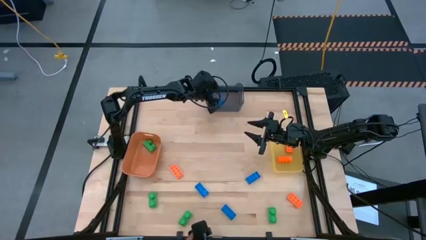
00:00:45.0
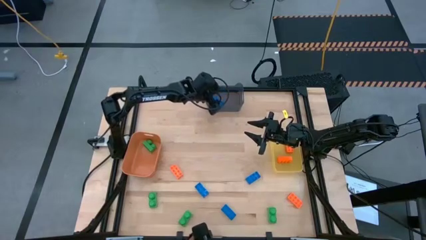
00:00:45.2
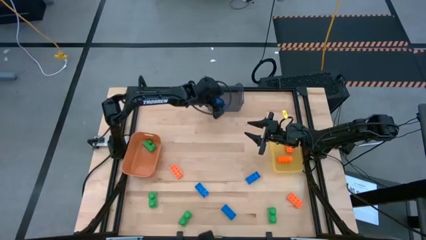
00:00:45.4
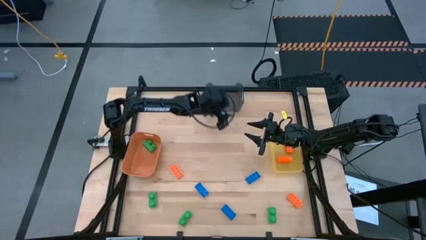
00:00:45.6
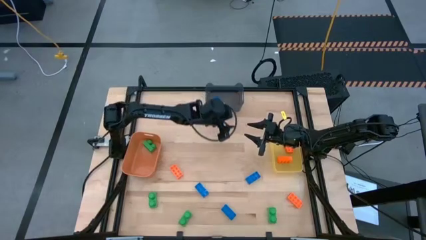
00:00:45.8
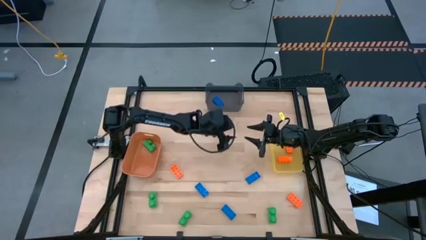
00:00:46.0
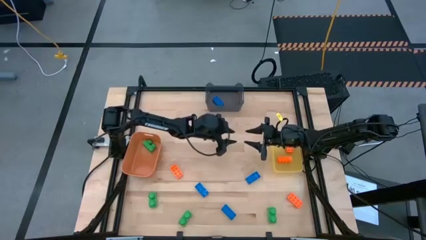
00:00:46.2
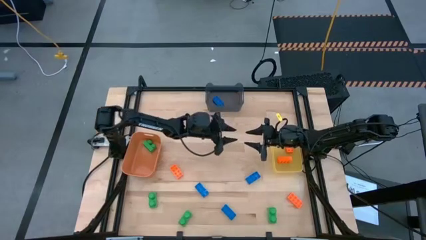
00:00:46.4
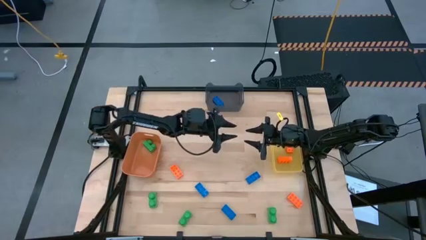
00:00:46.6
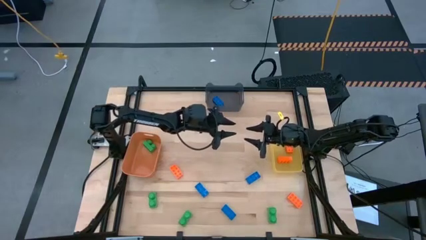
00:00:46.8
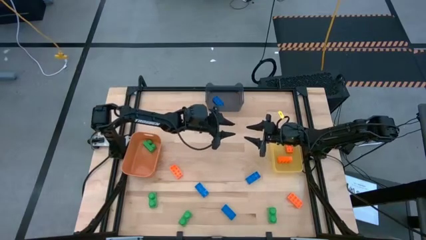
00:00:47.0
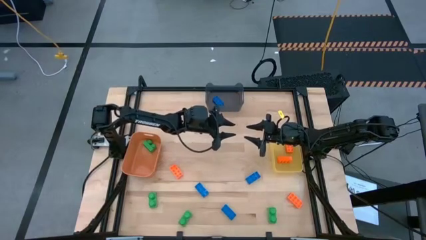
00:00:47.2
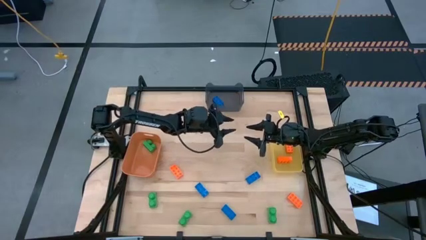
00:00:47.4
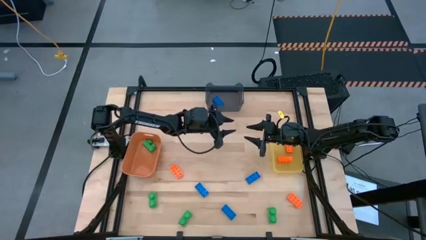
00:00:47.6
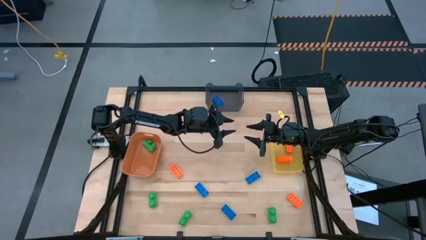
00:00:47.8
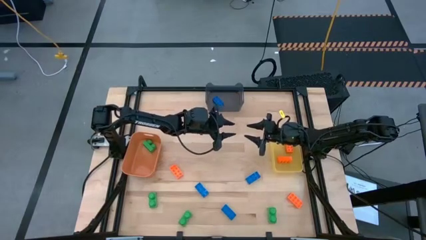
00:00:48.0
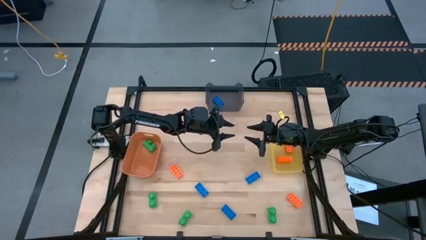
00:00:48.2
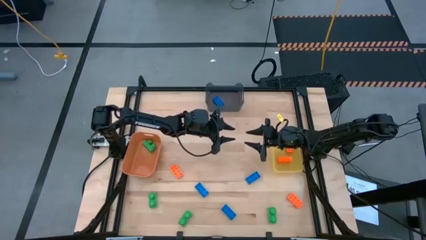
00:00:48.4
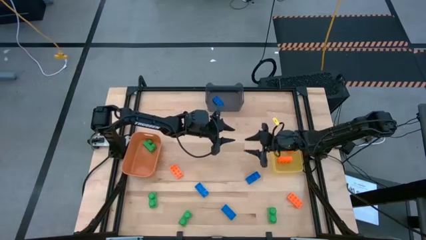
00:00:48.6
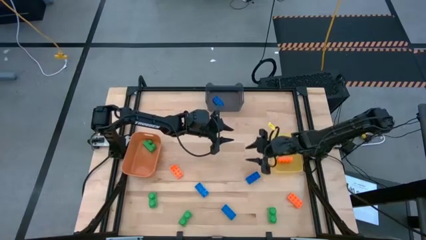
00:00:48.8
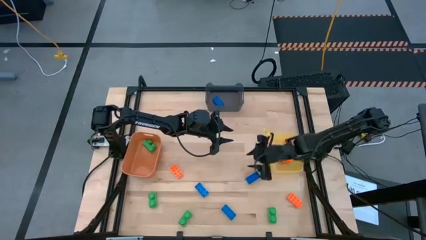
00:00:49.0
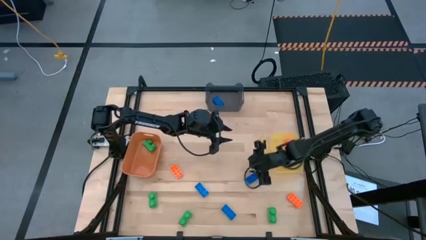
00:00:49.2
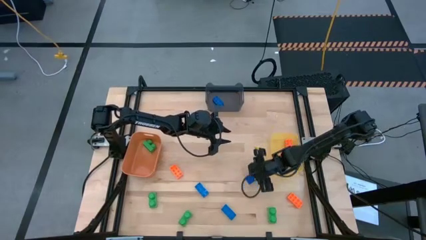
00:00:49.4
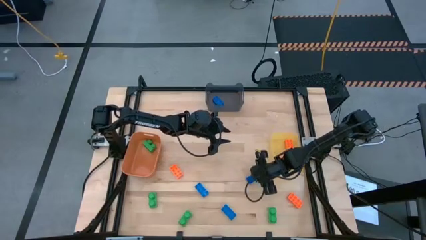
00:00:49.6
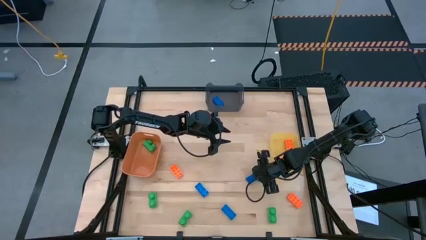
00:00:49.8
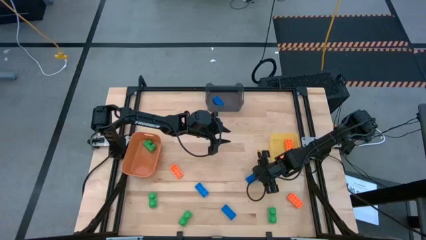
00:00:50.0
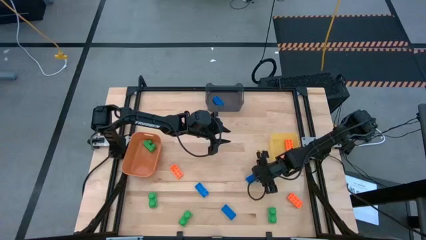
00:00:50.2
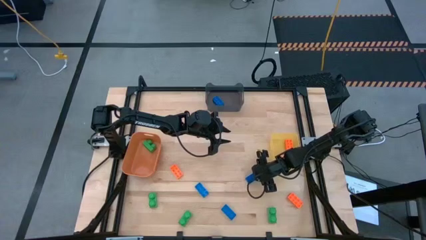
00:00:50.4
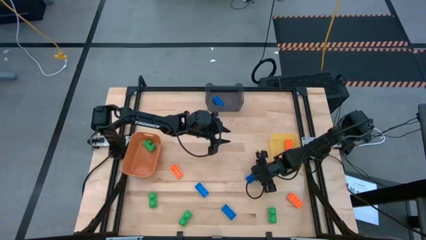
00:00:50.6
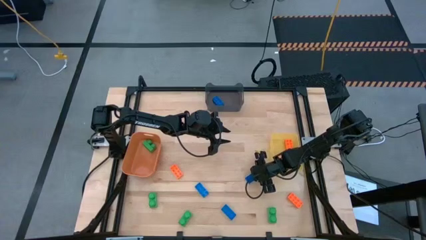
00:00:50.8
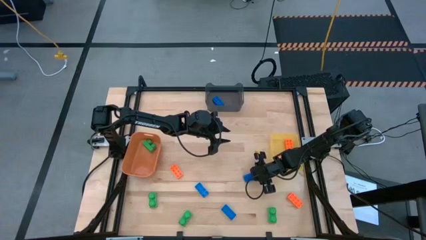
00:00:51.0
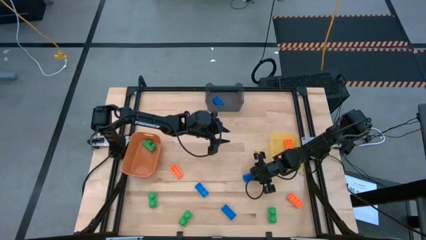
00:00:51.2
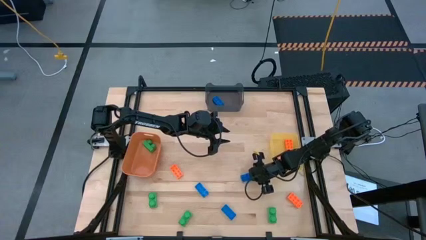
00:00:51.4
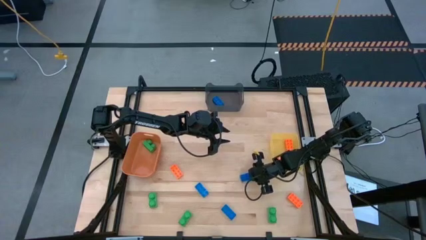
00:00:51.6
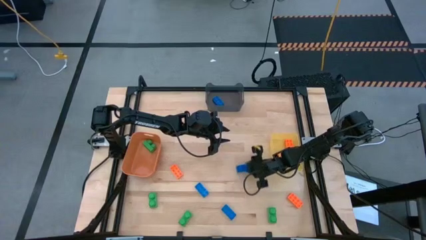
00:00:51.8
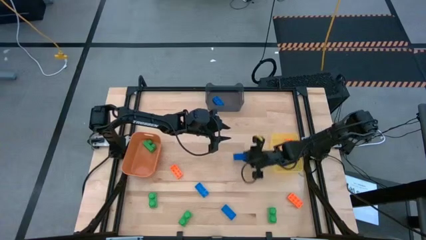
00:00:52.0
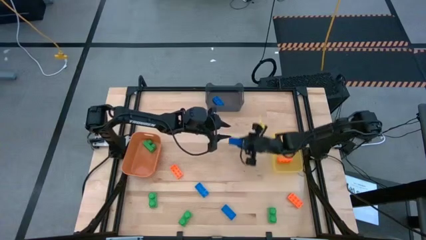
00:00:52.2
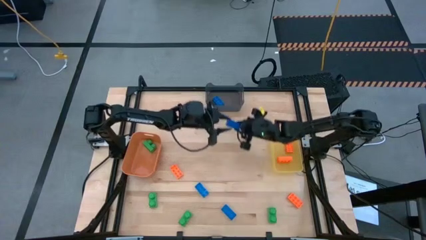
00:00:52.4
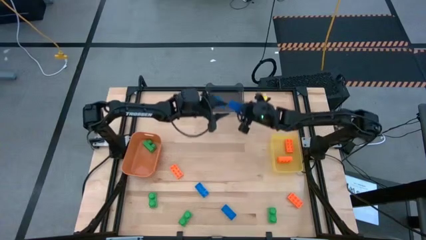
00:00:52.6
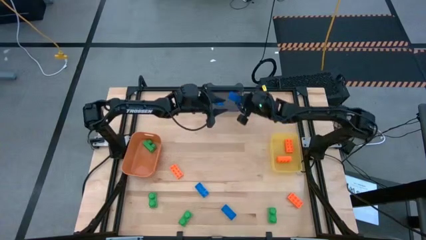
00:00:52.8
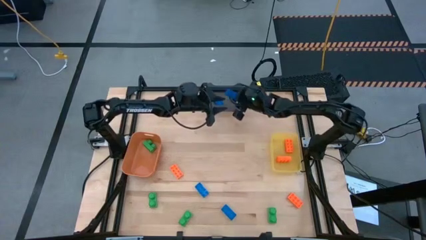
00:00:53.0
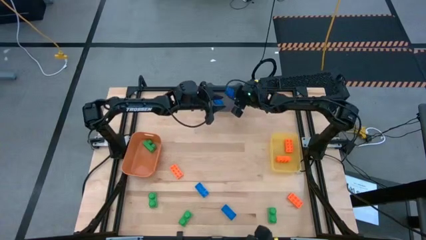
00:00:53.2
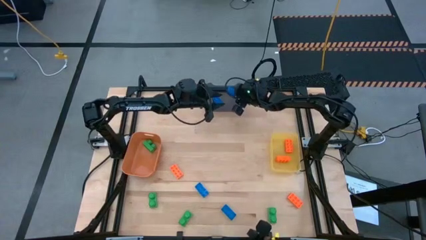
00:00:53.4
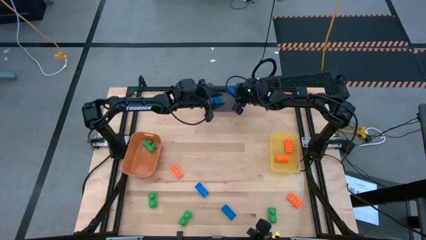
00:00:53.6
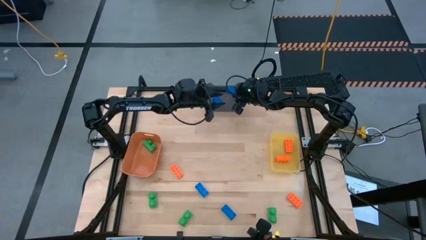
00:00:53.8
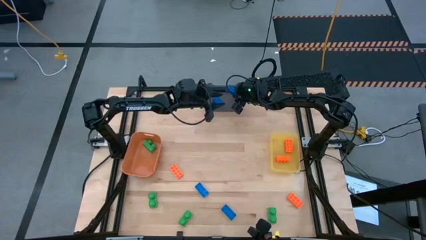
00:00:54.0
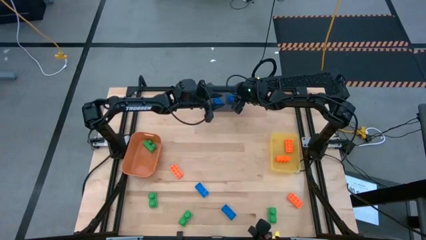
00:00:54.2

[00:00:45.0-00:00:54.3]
Task: Sort & place blocks by color
Put the blue game piece into the black bin

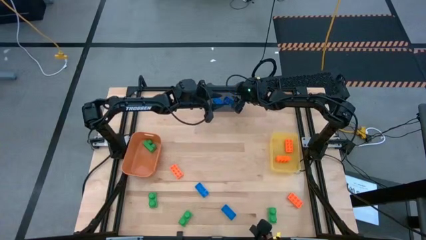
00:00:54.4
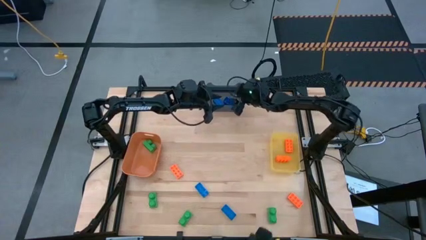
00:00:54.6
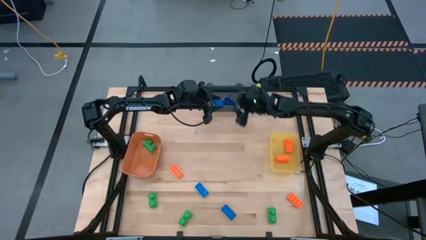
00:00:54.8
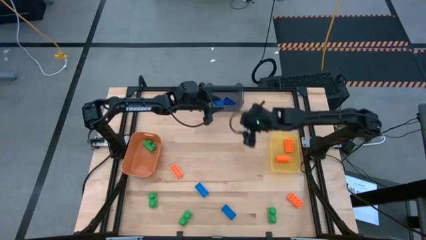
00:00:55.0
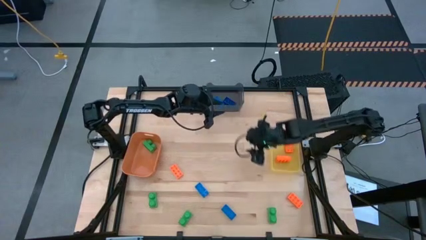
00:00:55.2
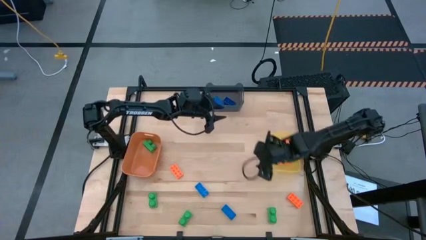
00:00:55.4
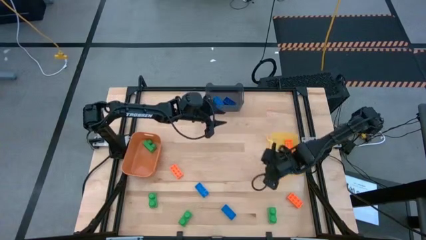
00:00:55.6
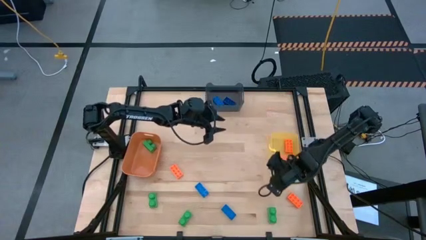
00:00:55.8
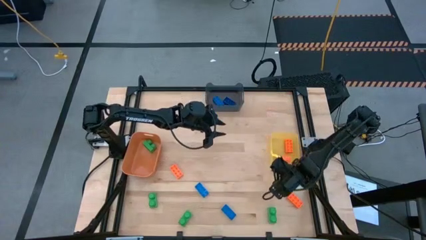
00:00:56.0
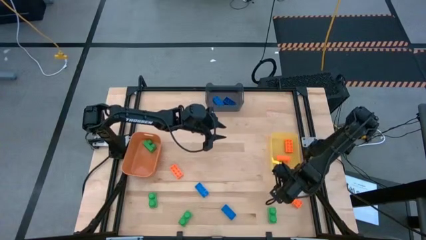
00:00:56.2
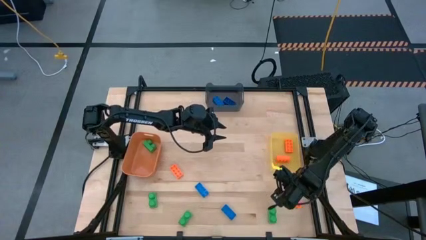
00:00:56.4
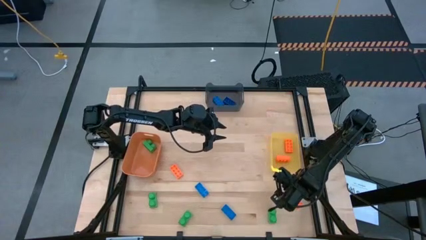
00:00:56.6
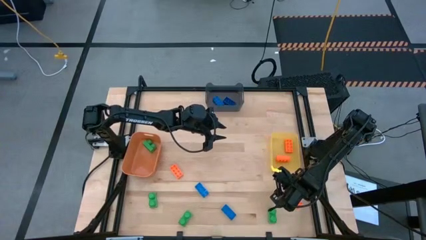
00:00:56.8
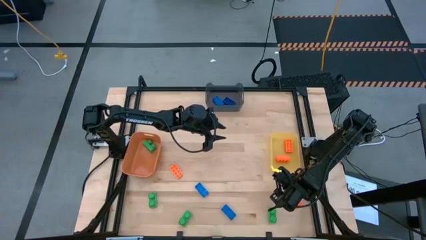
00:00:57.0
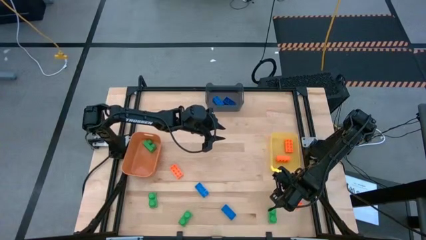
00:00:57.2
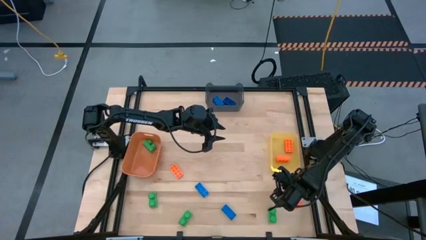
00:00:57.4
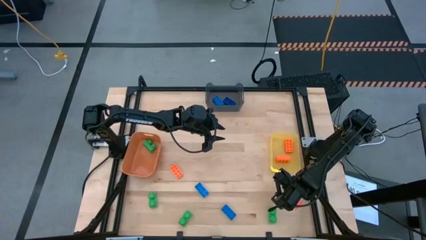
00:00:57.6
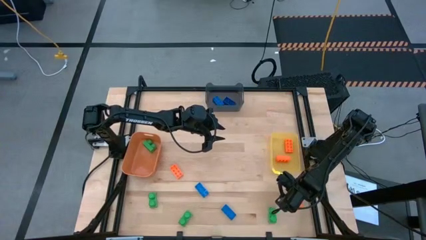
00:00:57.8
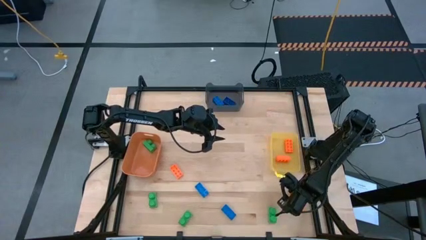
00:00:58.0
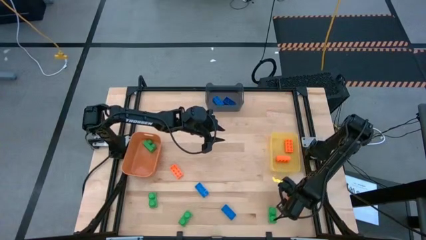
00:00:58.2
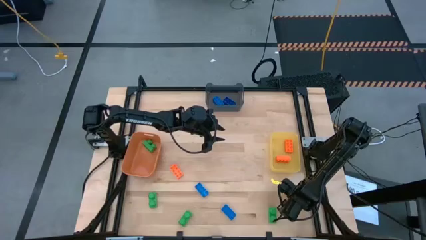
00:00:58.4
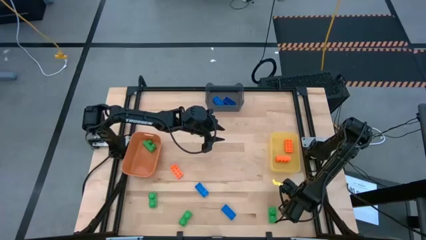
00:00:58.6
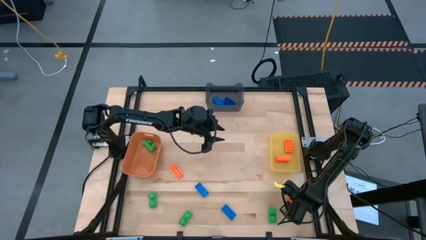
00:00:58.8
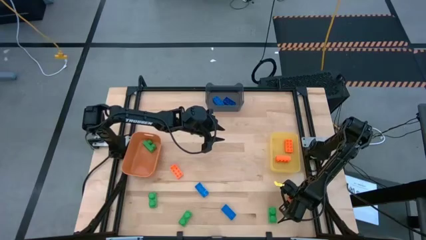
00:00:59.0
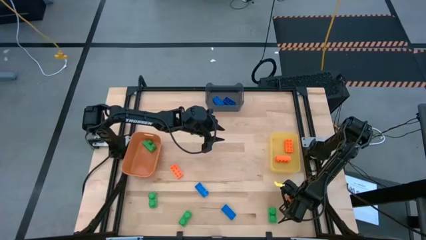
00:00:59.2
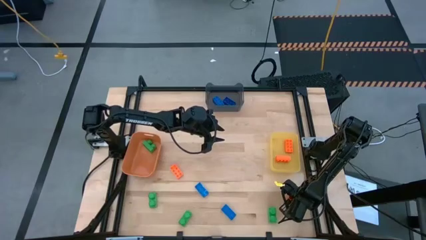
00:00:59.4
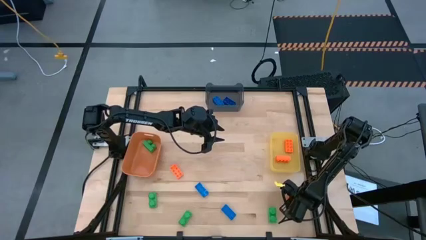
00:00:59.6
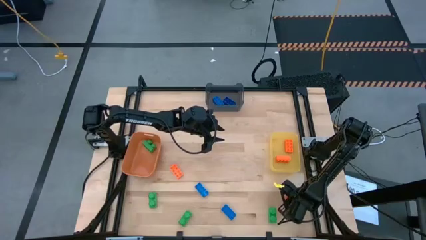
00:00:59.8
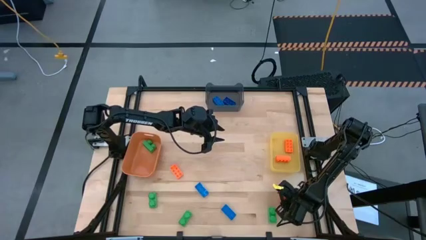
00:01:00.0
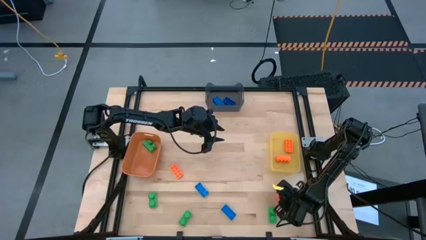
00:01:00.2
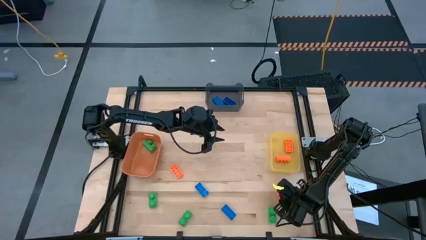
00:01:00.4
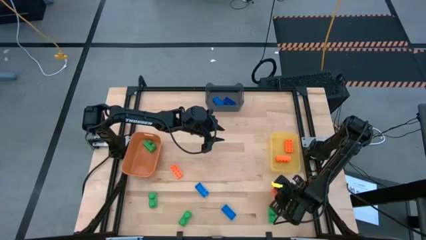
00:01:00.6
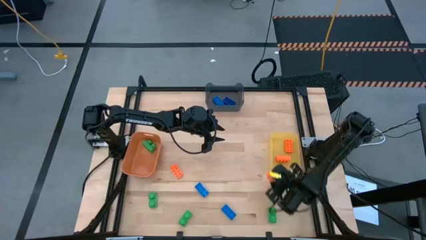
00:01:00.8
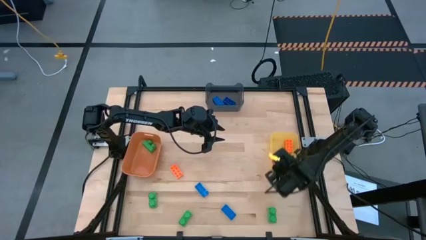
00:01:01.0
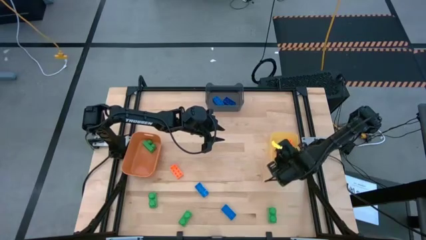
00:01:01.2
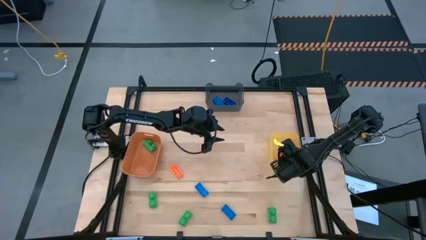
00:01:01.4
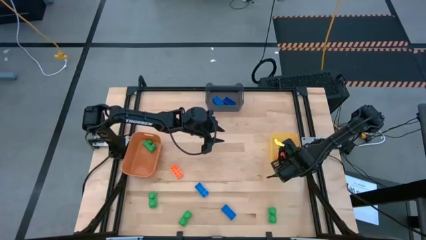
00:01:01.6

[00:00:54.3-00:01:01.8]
Put the orange game piece into the yellow bin
